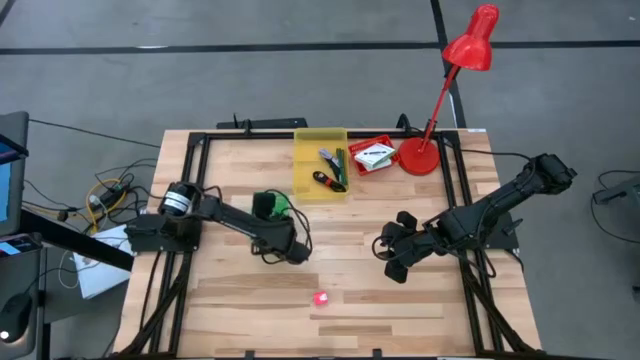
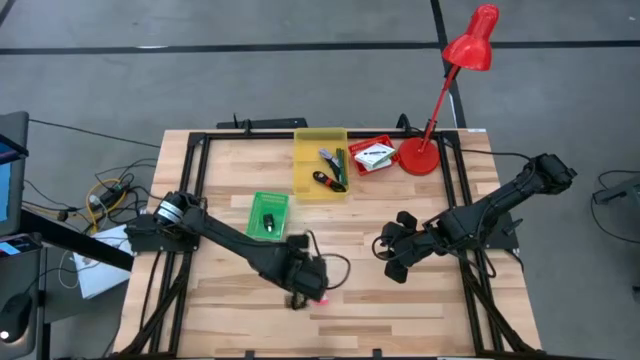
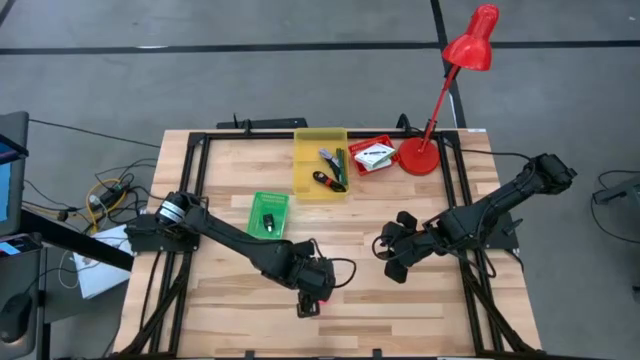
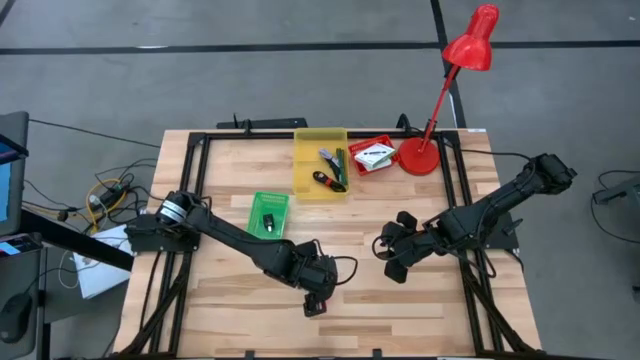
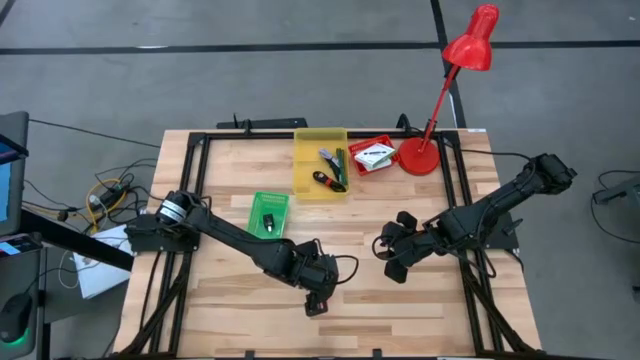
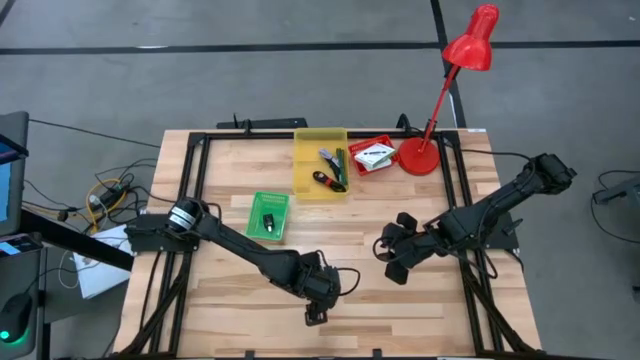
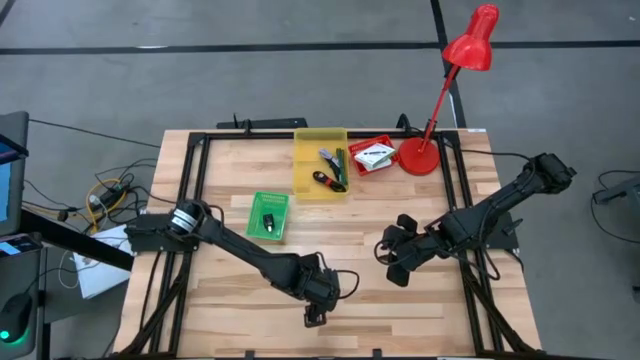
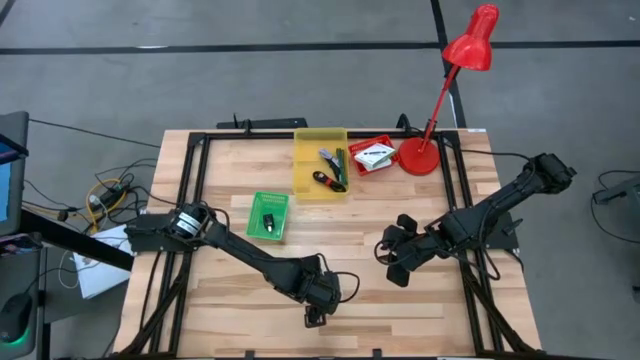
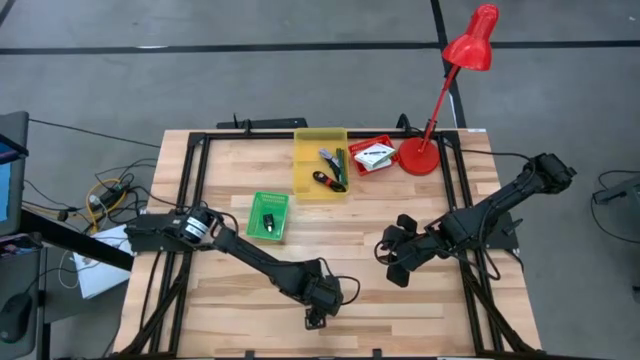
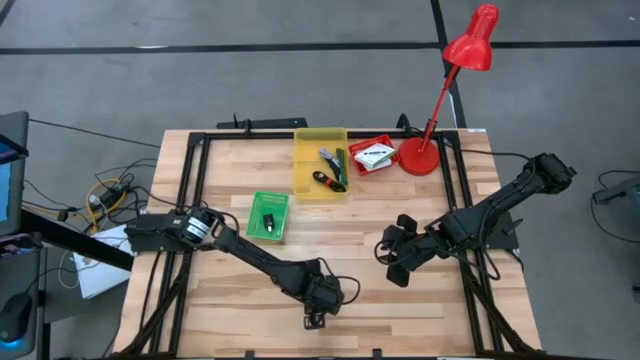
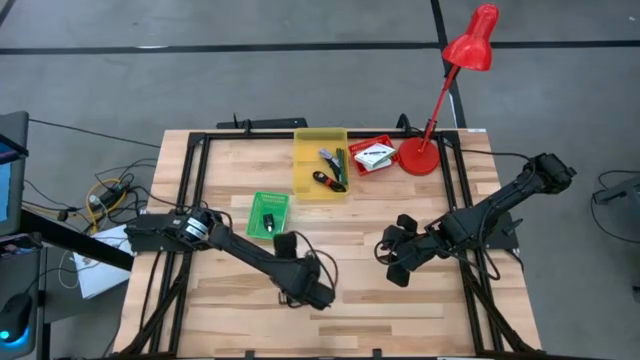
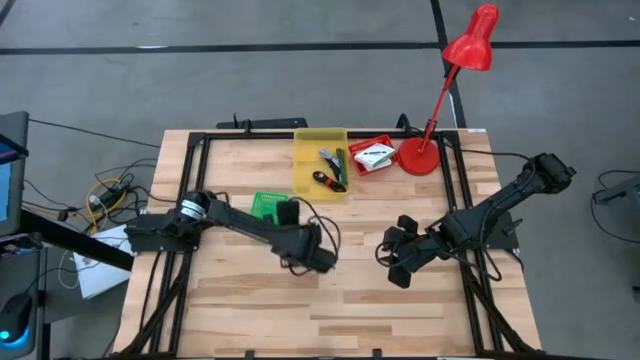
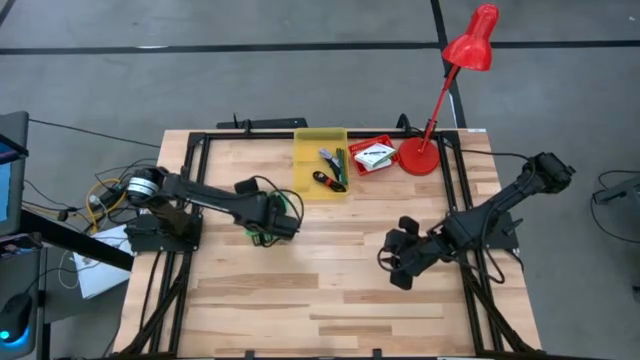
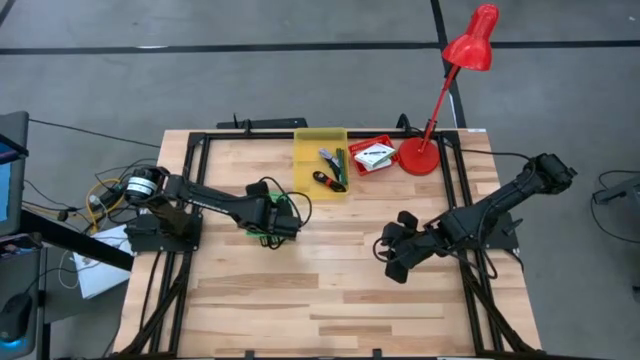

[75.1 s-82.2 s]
Task: Pick and place items into bin
Put the pink charger adapter into the green bin

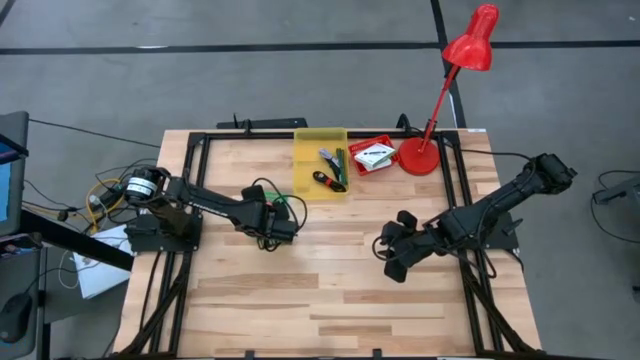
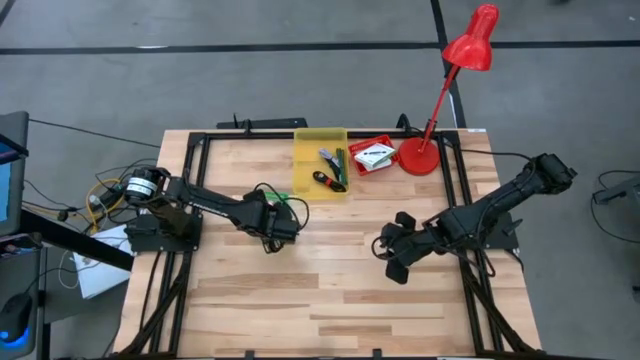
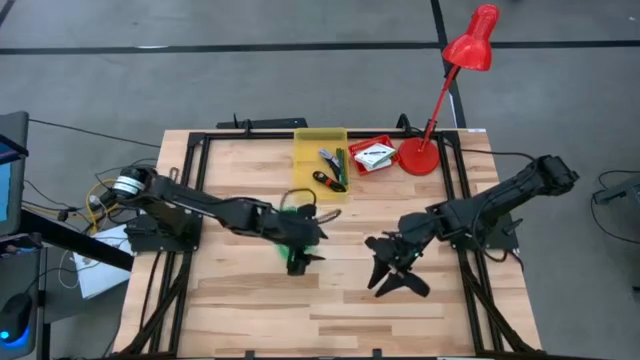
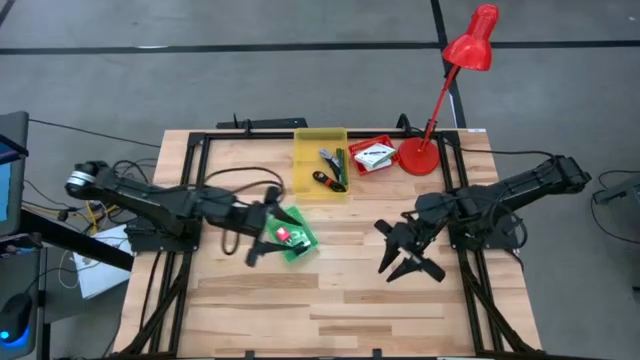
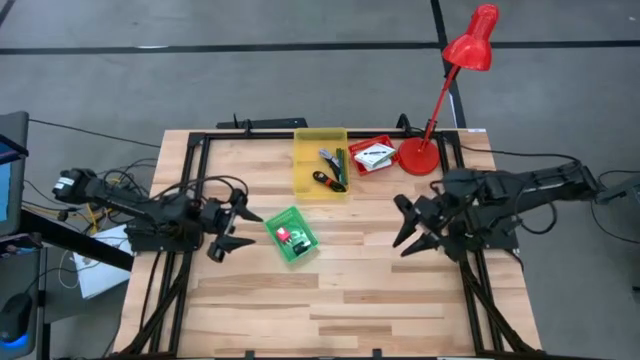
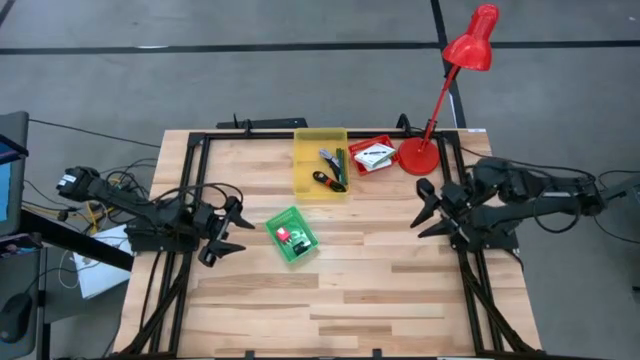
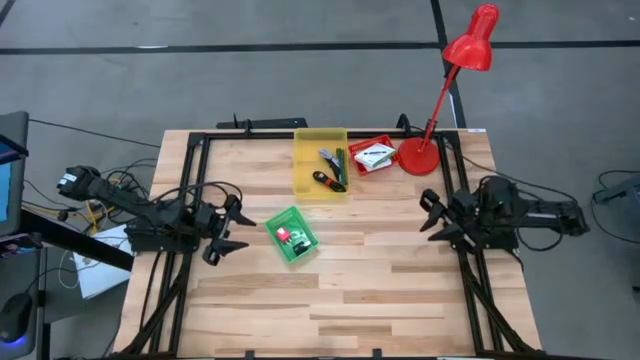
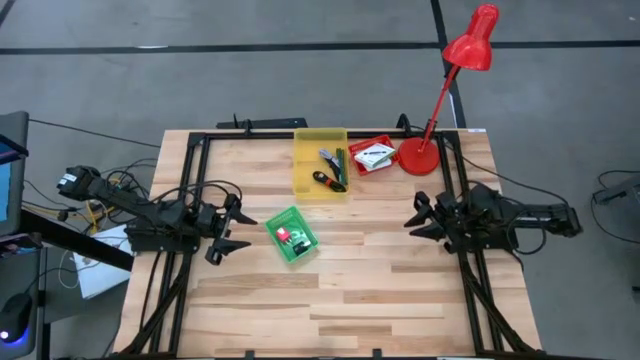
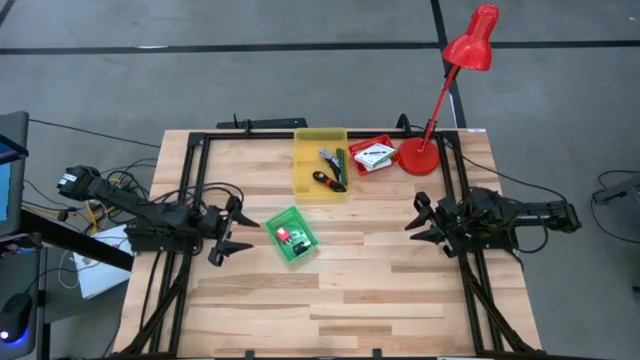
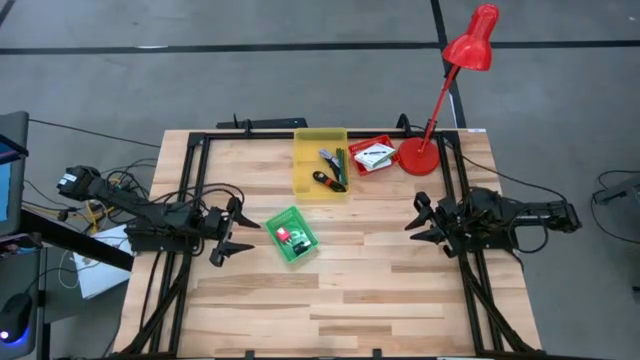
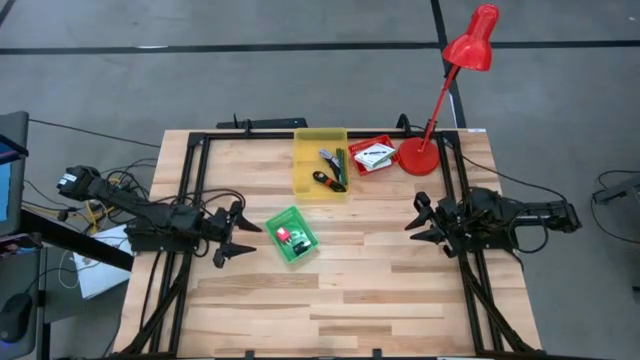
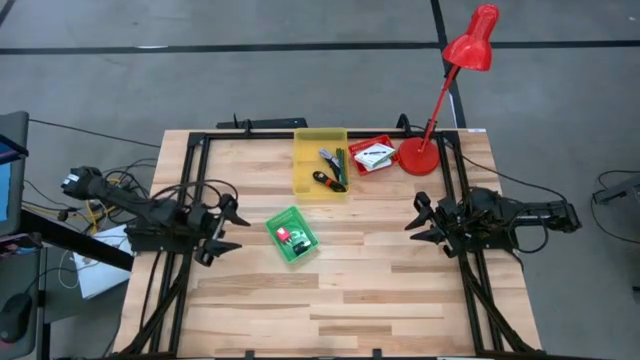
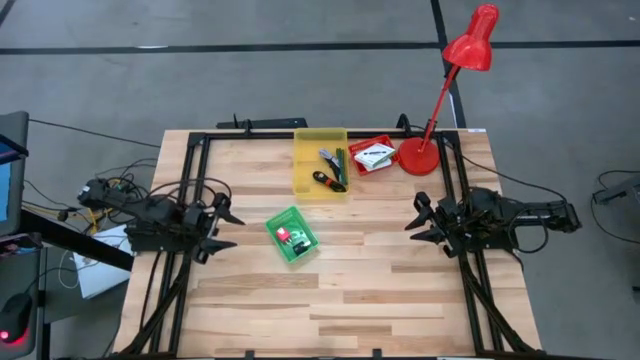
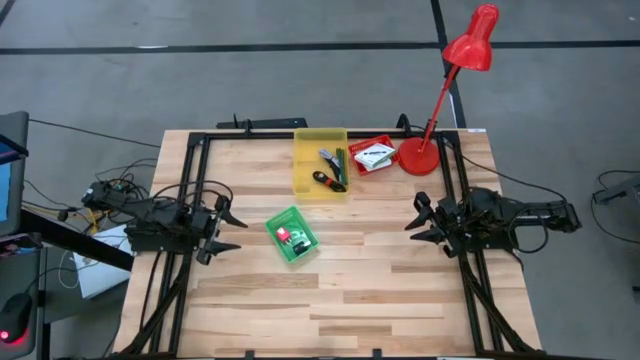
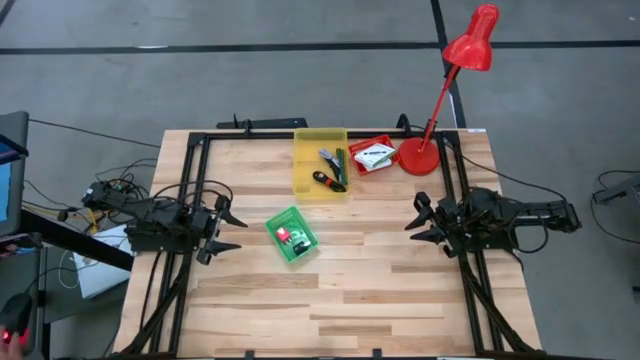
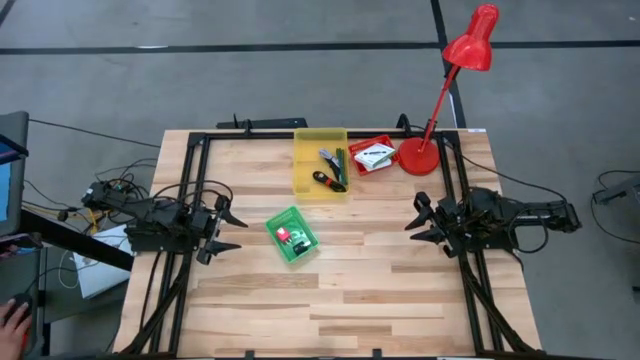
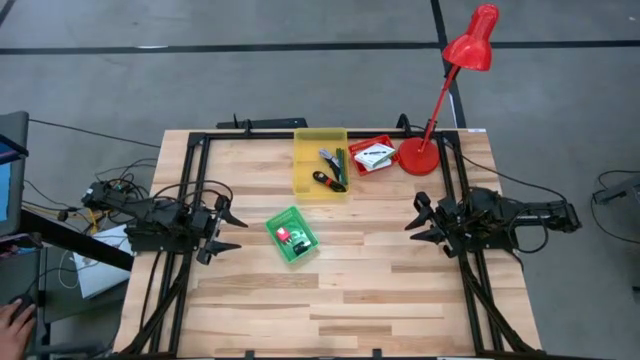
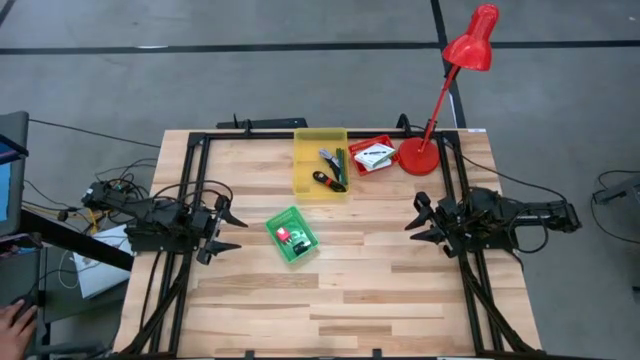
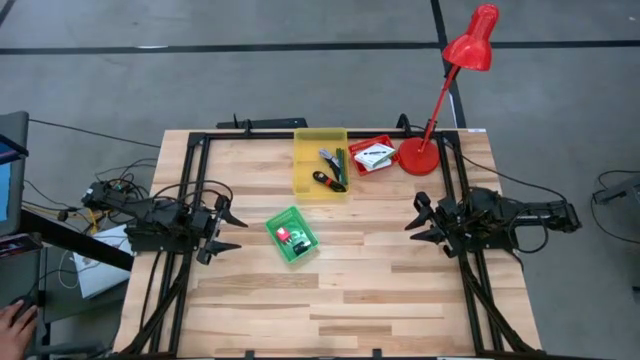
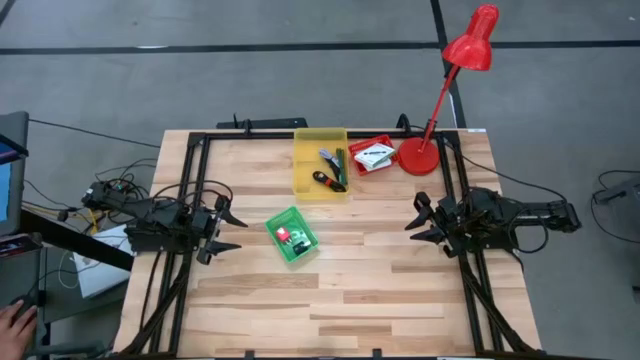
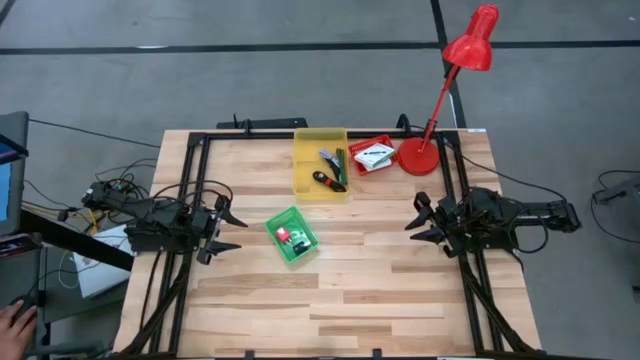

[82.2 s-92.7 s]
Return to Home Position

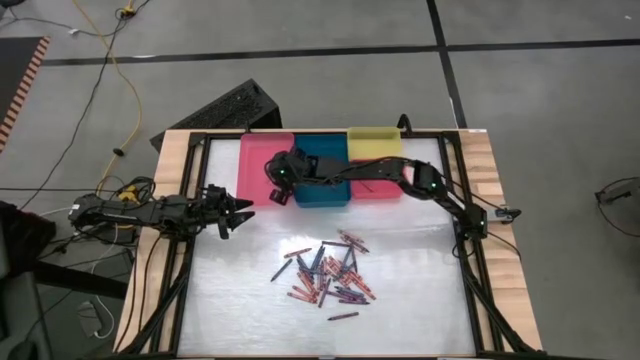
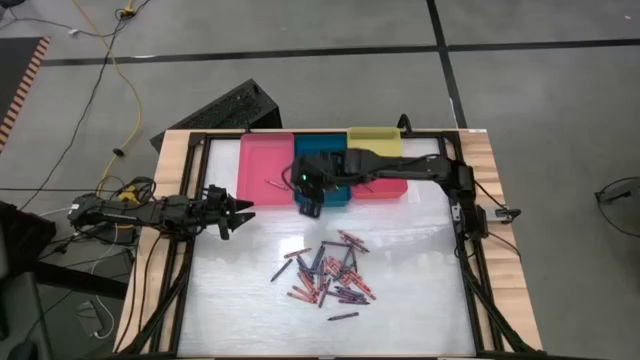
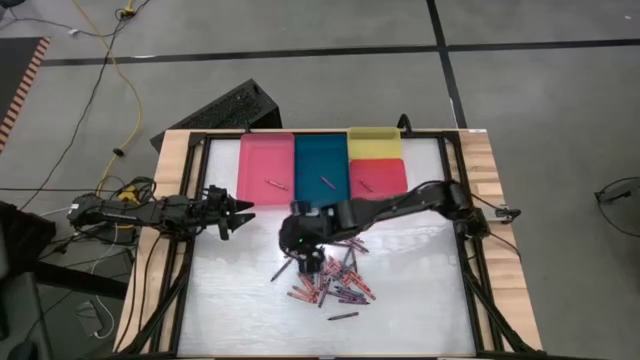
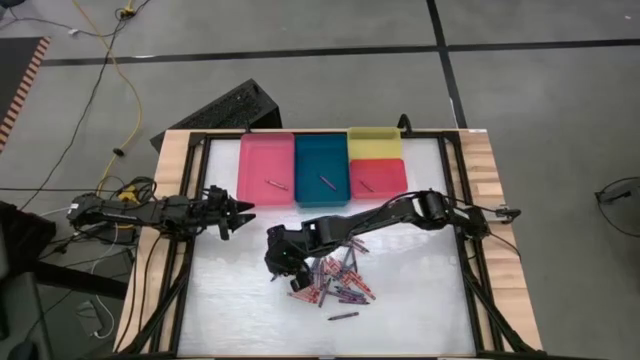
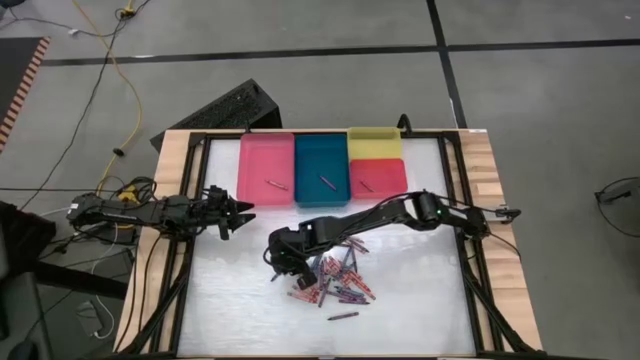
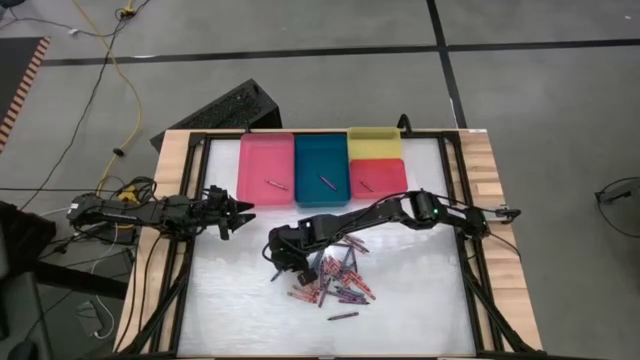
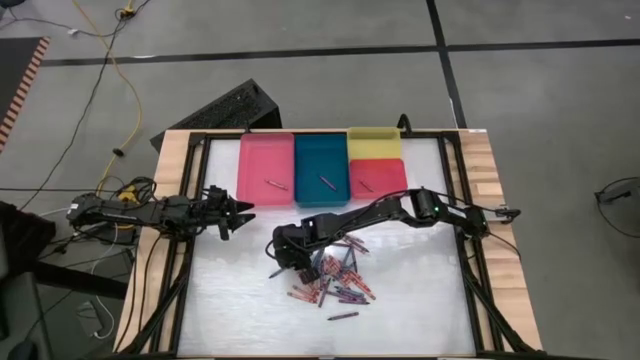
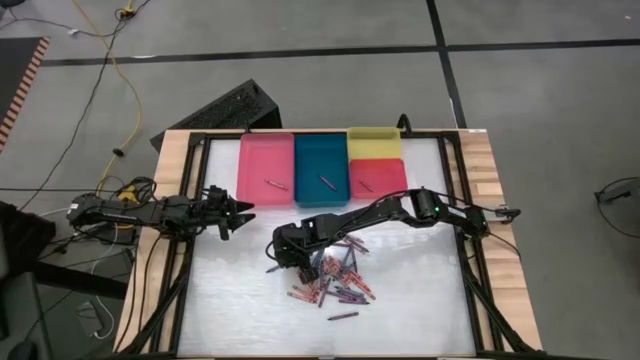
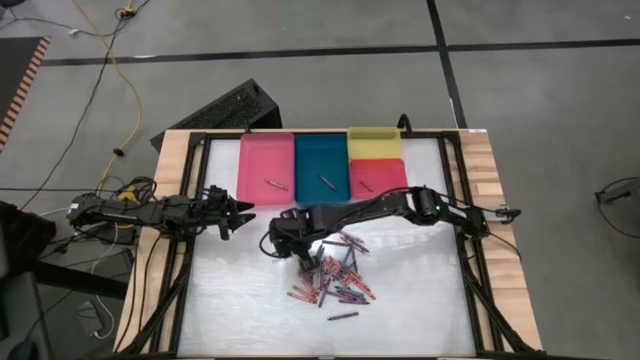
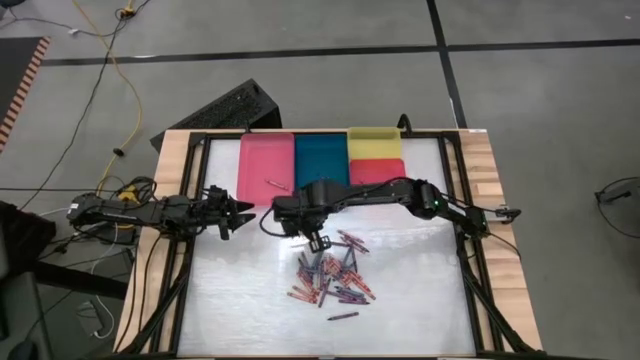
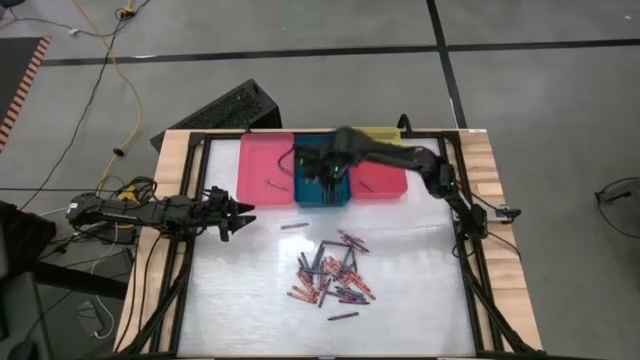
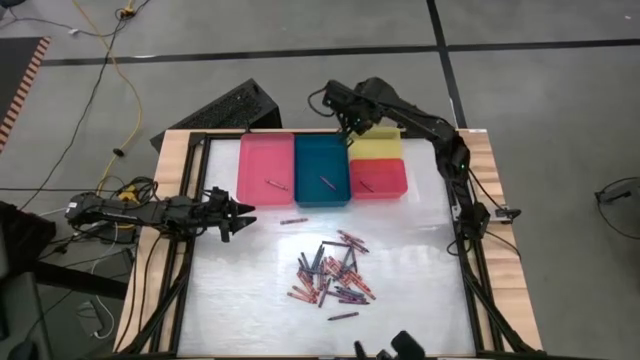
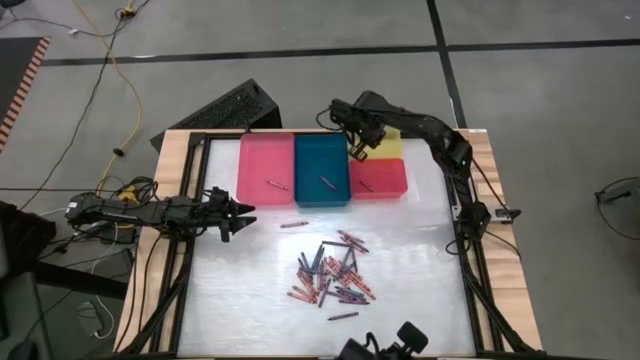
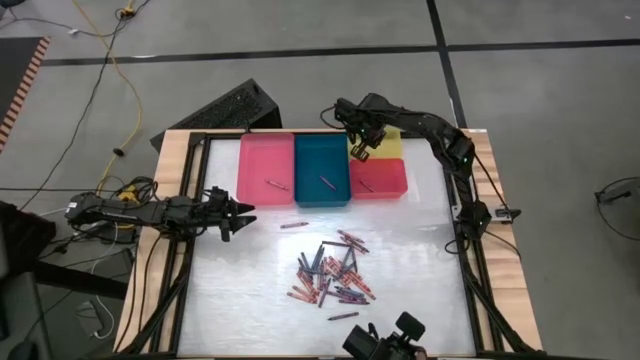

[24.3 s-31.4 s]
Task: Sort crayons
Put the blue crayon into the yellow bin
